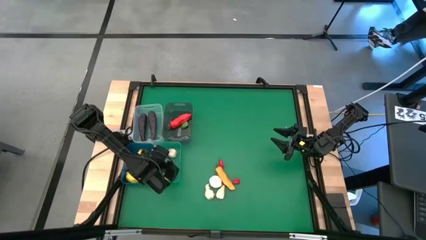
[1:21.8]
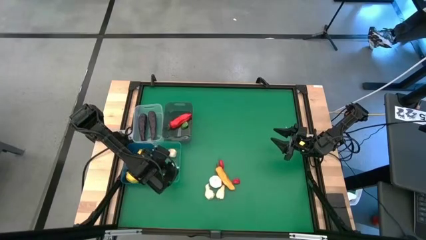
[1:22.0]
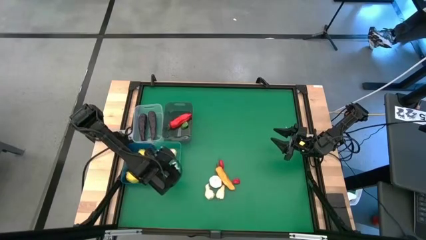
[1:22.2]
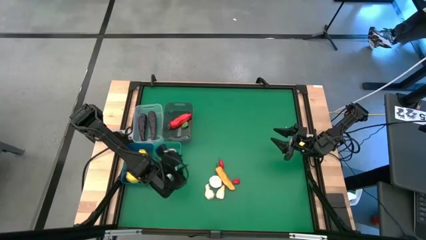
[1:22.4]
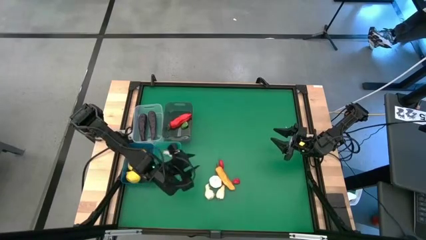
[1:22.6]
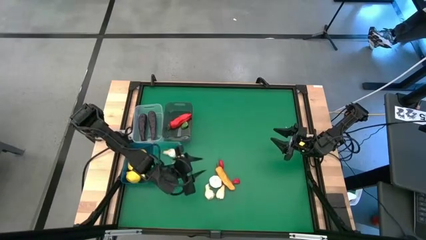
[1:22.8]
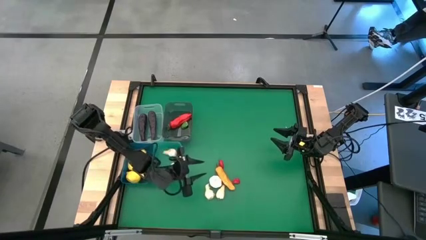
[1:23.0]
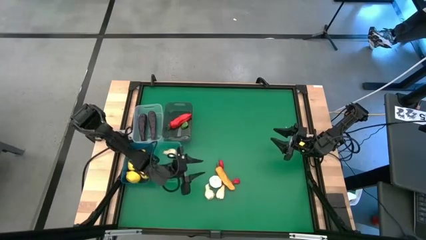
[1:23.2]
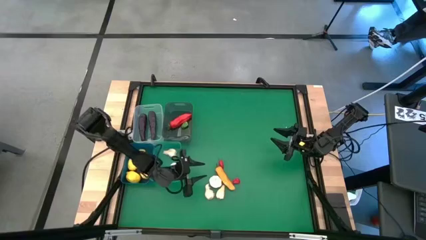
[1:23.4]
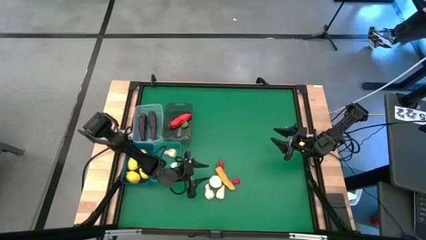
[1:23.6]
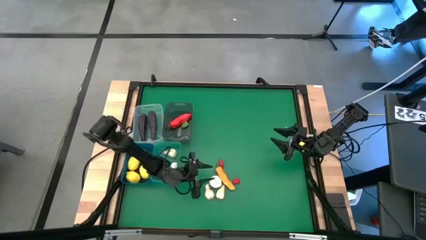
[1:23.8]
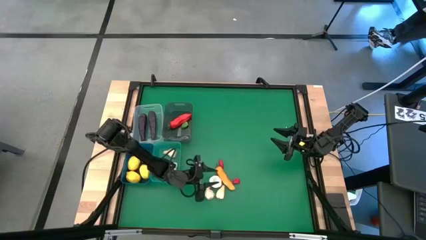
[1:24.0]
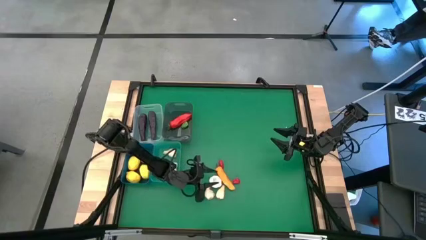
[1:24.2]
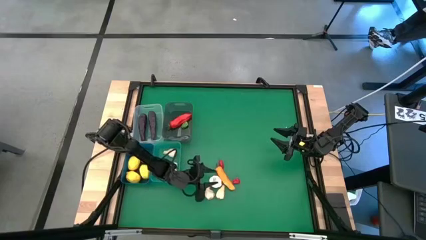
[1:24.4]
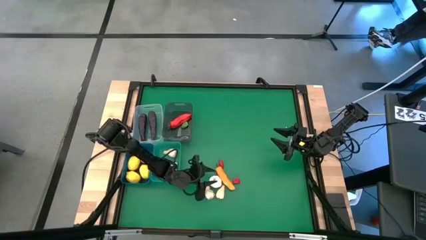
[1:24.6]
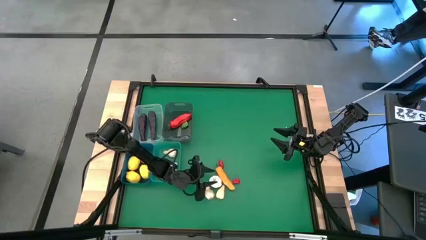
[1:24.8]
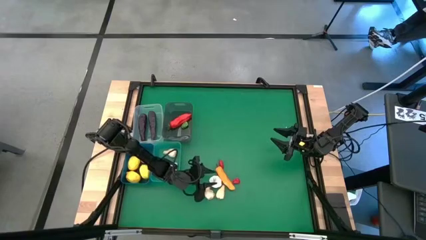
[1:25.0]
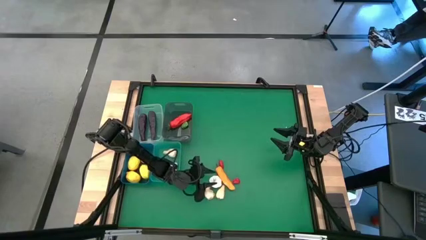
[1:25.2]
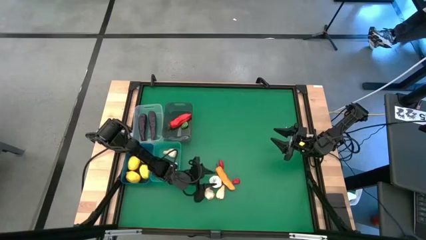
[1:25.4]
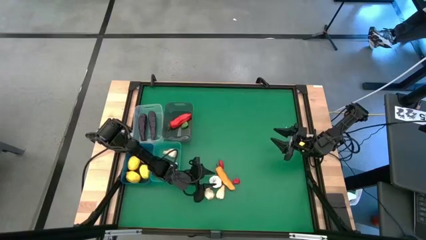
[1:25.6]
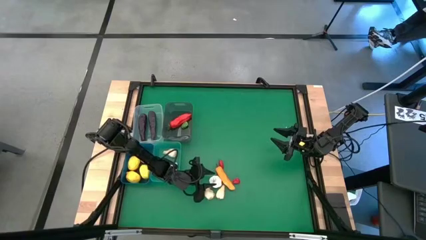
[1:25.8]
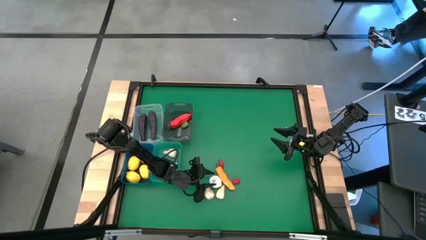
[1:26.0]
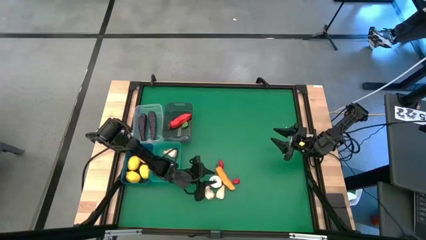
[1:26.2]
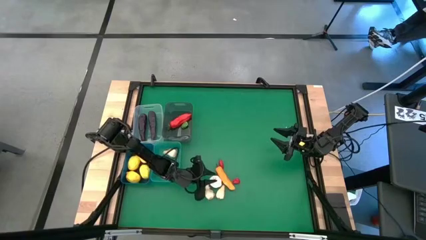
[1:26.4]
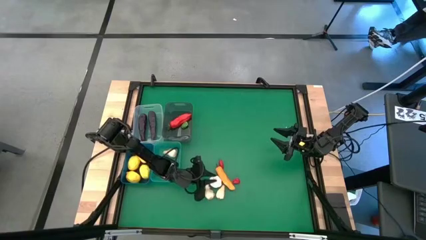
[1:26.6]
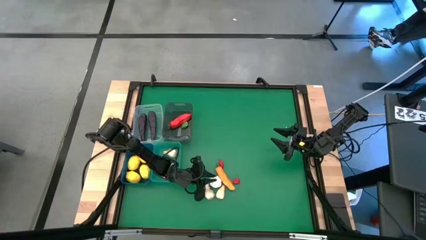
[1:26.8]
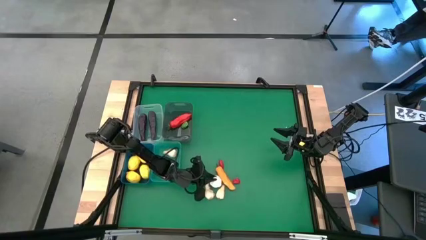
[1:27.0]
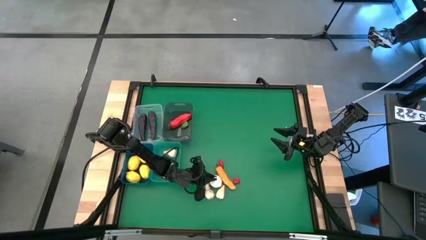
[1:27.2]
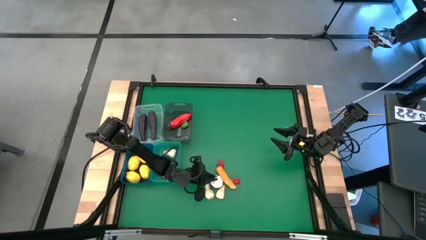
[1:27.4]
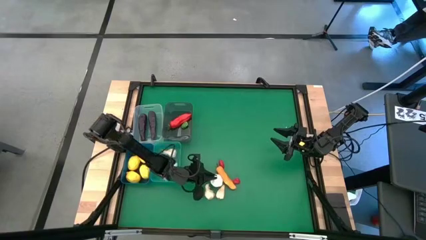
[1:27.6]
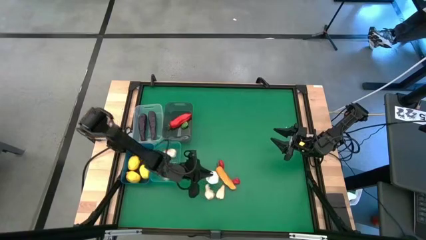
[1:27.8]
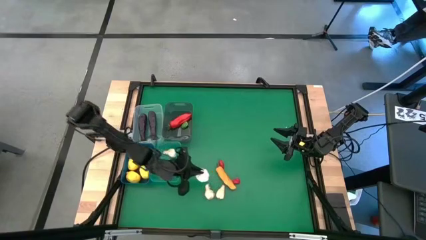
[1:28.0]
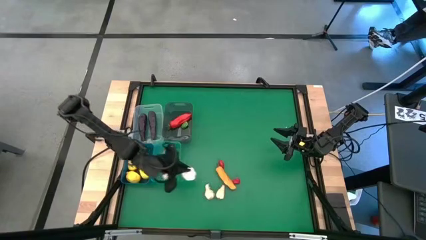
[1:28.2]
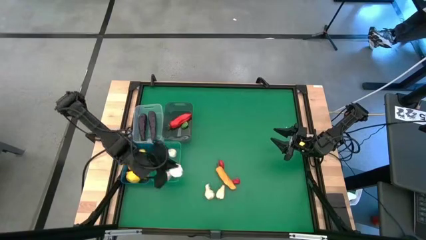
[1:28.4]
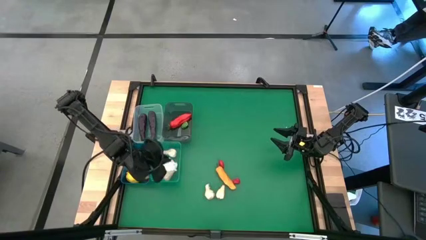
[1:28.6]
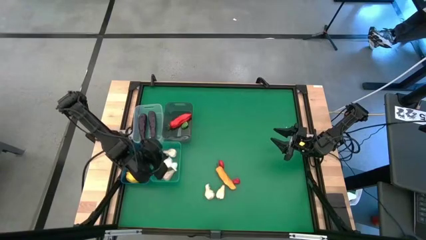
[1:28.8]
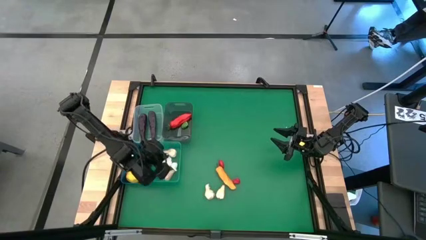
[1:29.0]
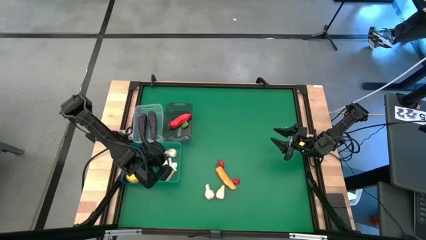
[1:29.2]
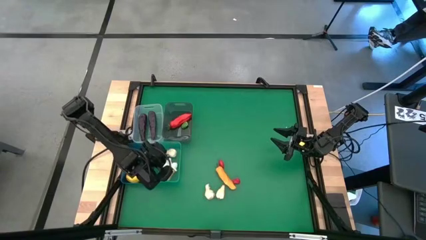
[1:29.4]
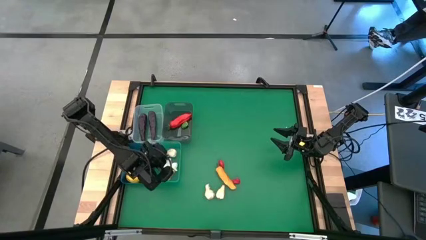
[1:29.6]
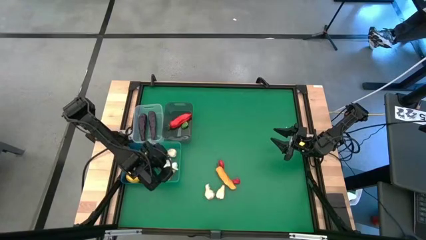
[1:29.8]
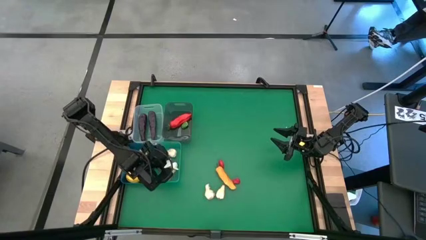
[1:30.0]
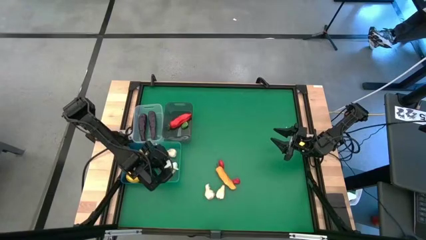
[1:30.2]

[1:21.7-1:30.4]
Task: Sort produce into baskets
Put the white garlic into the green bin

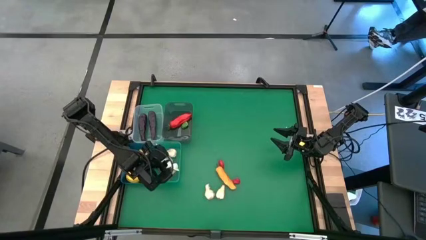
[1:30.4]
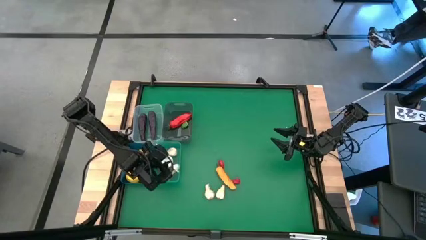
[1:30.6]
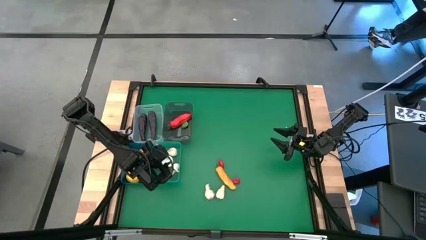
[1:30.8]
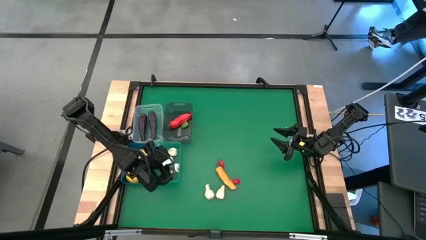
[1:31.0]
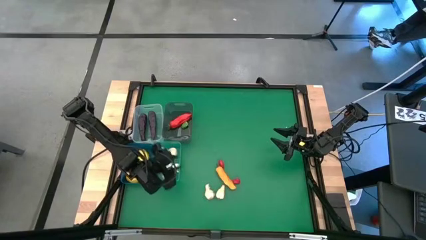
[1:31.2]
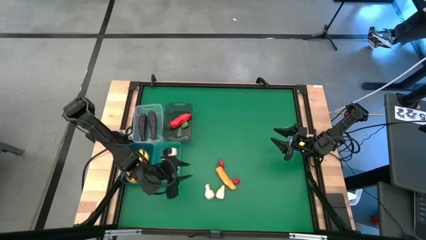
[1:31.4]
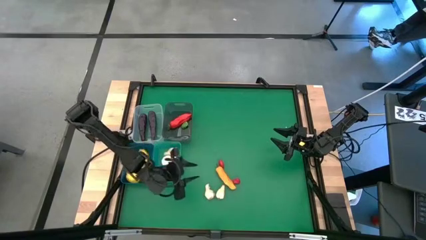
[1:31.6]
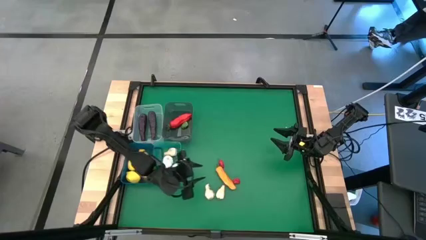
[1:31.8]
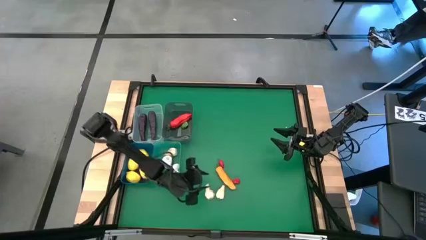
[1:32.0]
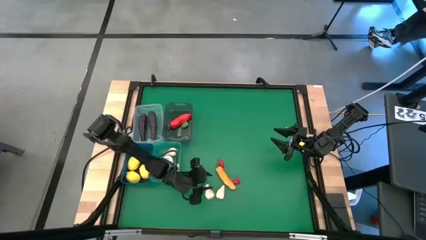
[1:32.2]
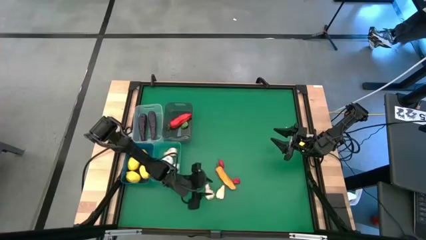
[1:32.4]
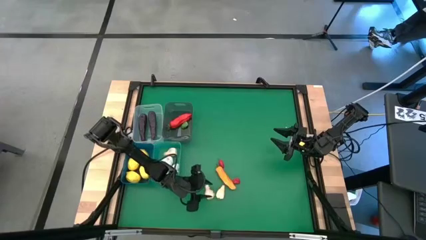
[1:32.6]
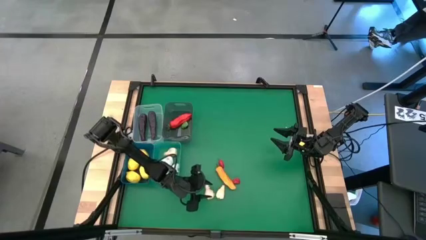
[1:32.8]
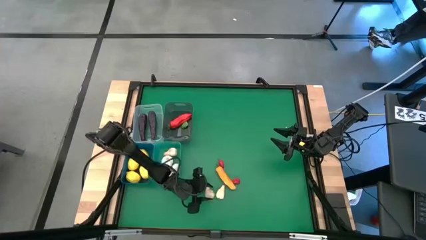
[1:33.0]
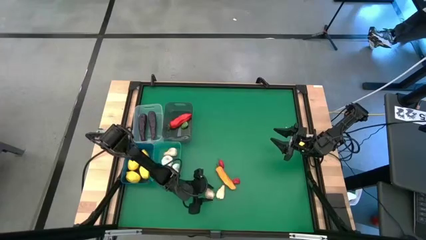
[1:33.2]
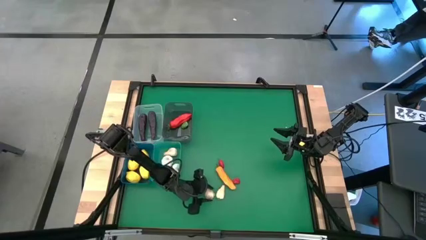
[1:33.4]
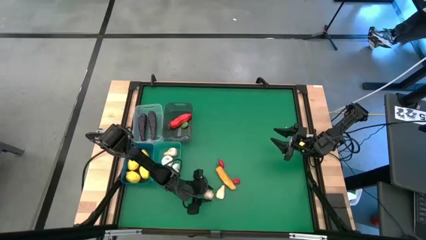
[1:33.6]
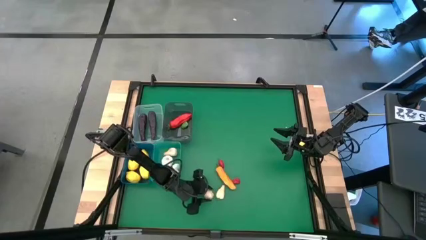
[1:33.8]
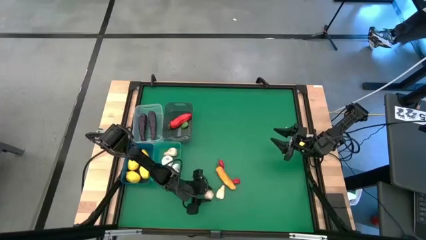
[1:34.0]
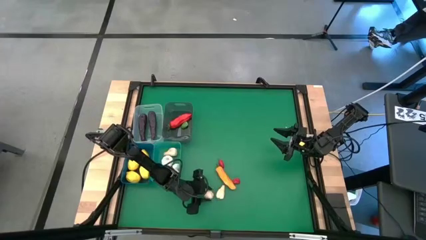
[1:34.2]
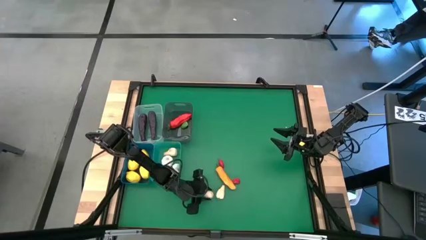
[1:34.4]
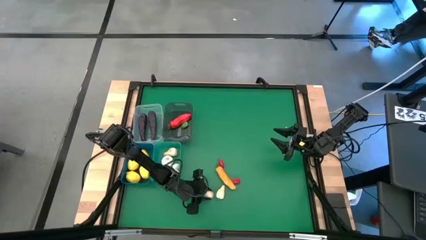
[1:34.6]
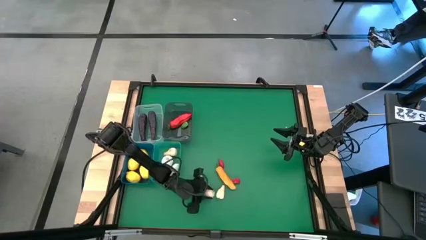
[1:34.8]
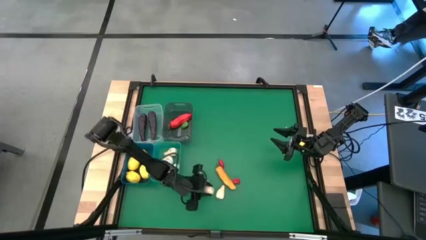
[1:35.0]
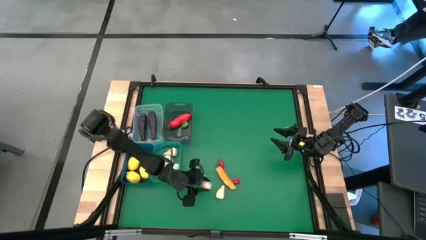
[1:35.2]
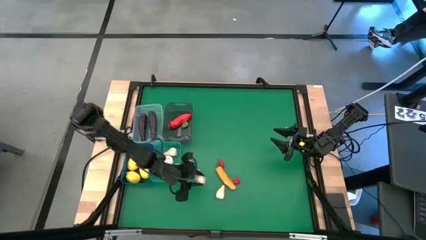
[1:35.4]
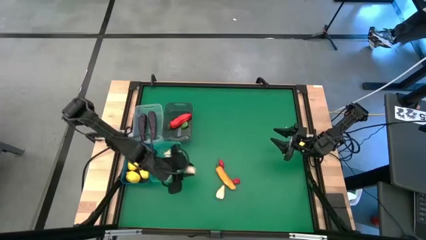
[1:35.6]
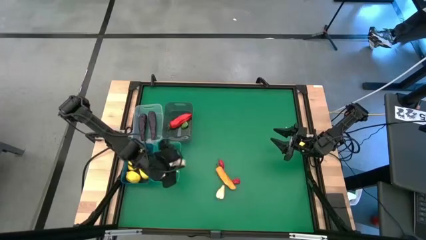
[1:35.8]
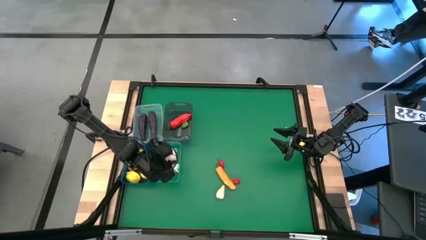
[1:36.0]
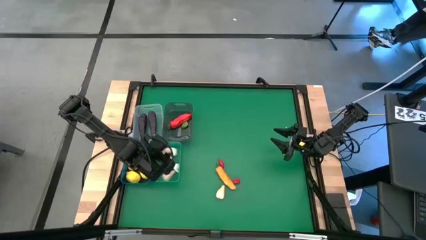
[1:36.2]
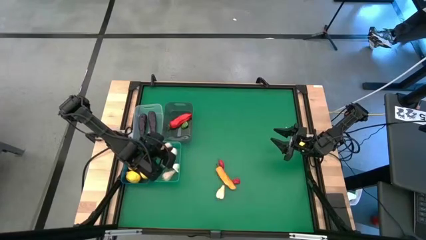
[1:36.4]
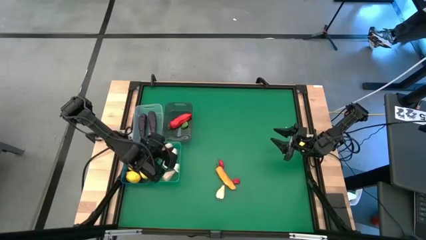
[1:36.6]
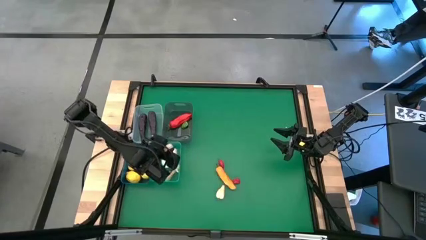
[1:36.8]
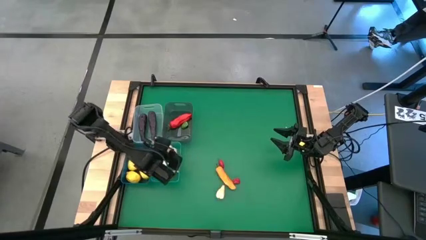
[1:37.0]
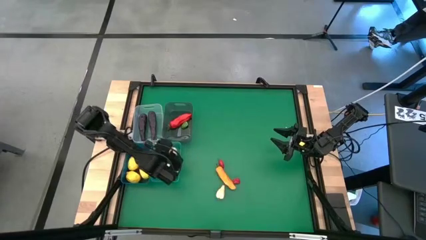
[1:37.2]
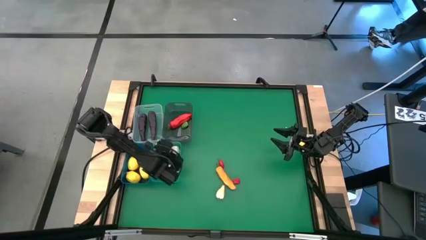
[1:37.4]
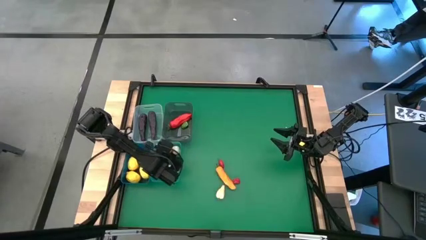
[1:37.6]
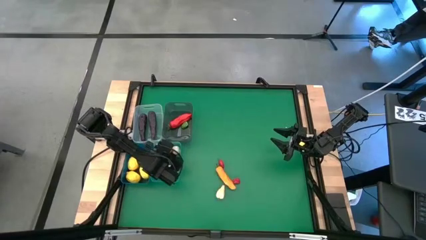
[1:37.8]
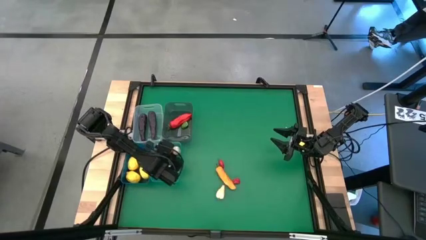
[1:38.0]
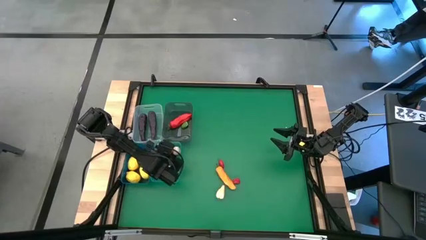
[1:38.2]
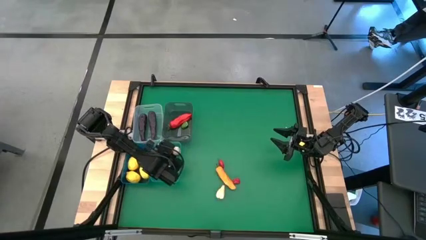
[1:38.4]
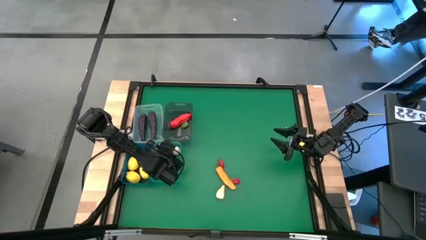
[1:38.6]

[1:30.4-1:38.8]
Put the white garlic into the green bin
